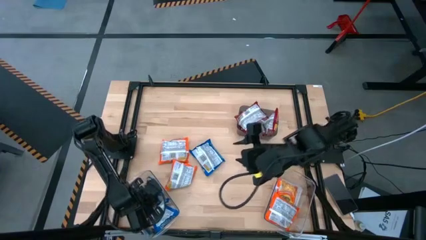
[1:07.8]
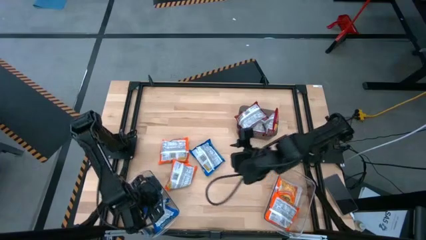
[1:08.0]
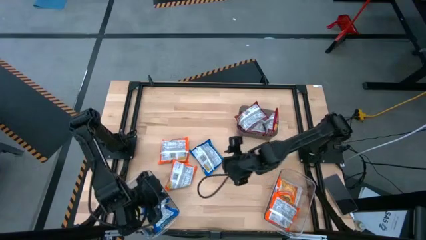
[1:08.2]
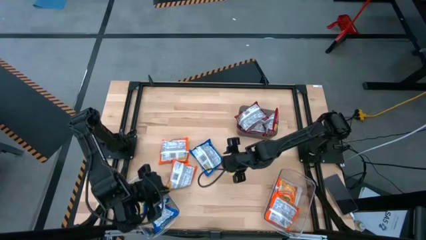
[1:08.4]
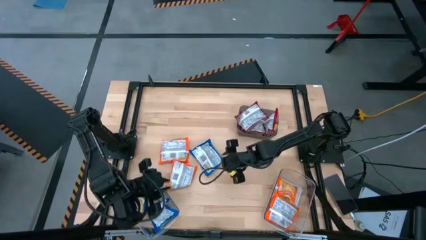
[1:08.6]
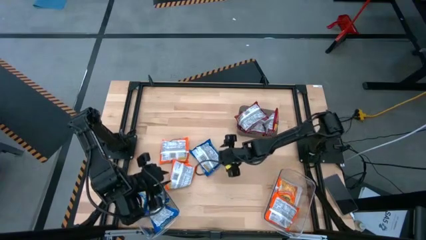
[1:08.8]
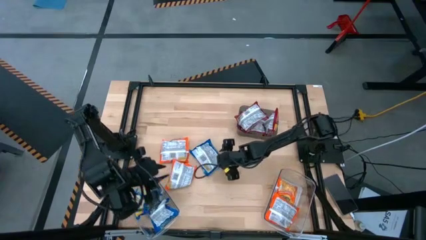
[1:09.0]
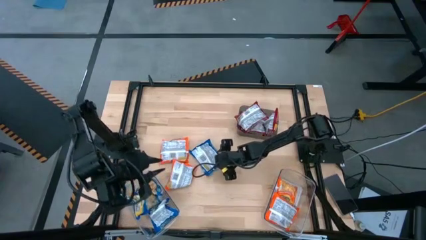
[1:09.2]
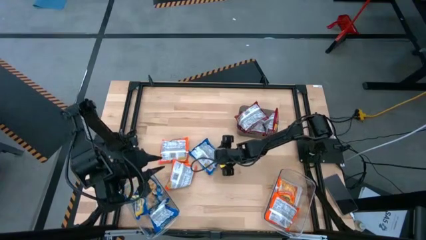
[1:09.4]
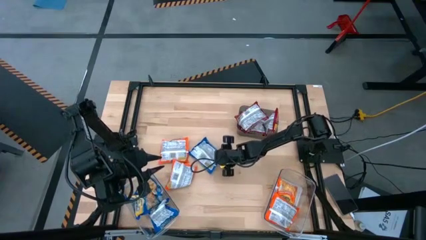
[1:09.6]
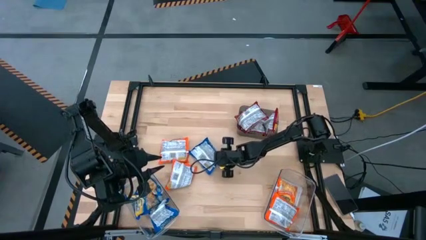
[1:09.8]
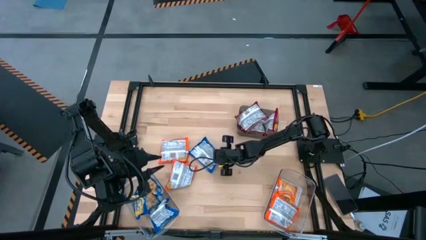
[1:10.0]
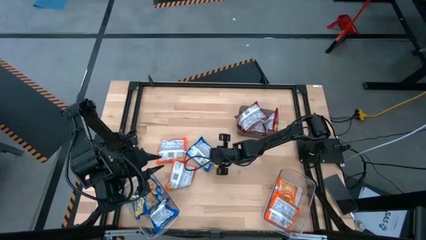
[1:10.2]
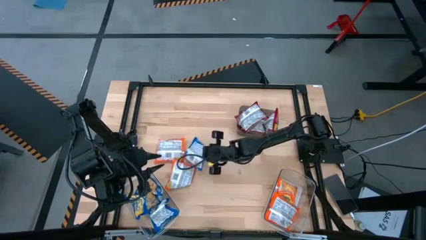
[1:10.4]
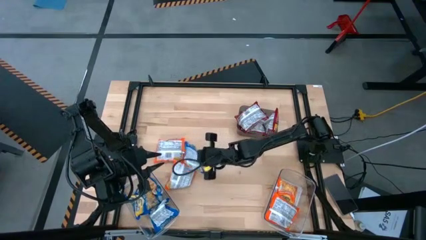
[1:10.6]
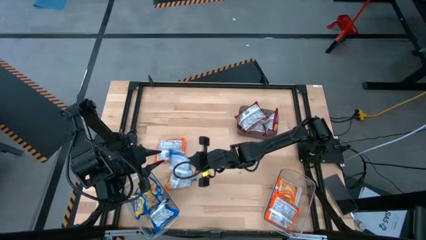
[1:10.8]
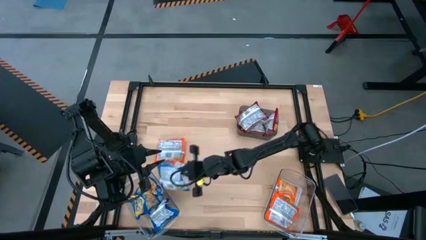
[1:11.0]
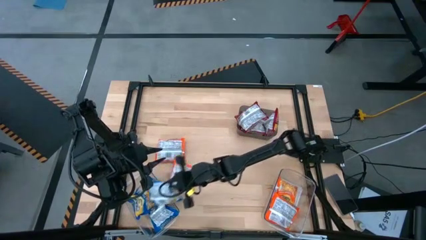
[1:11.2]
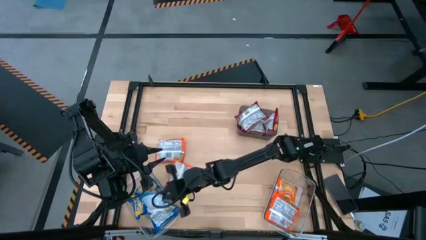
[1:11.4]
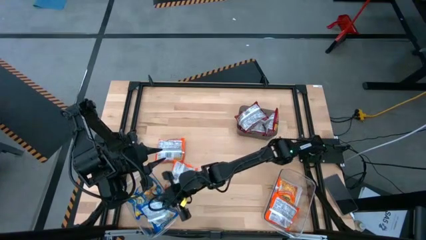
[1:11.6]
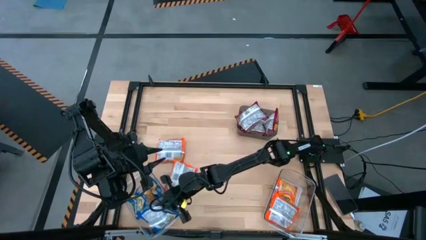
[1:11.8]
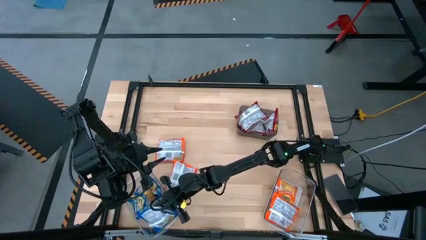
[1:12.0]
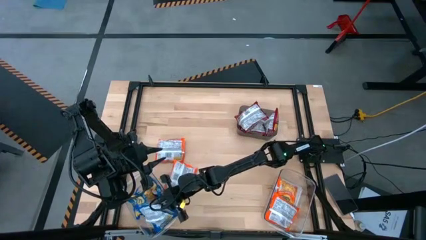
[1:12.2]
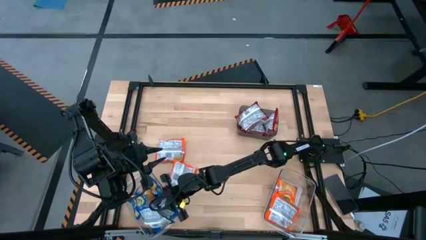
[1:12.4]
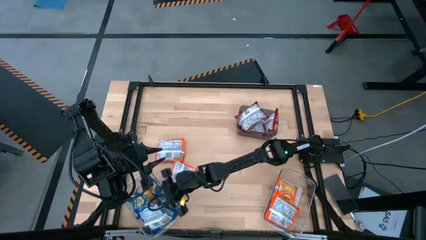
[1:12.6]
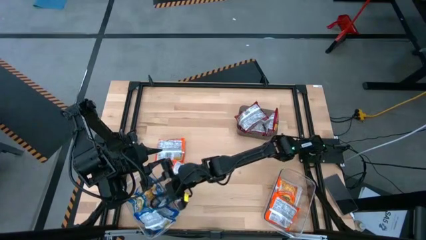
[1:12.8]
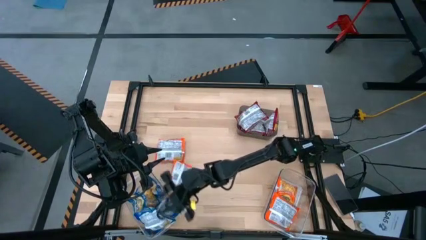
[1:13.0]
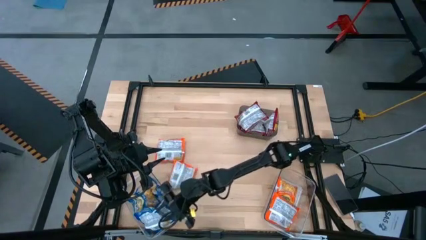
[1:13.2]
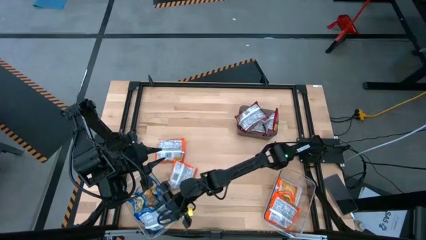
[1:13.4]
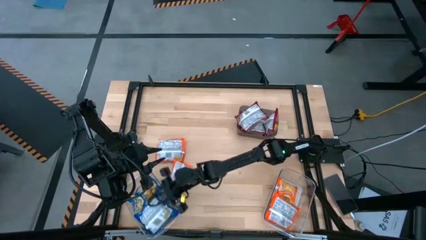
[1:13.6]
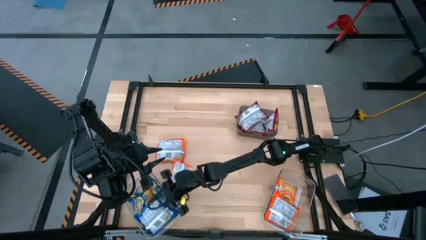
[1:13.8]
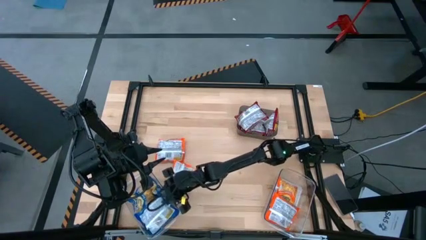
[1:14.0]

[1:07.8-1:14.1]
Task: Sort Maruchan noodles
Put the blue noodle pack into the left transparent bin

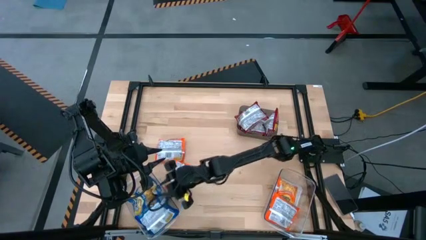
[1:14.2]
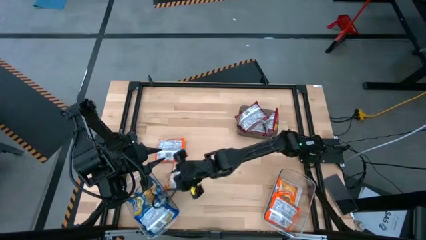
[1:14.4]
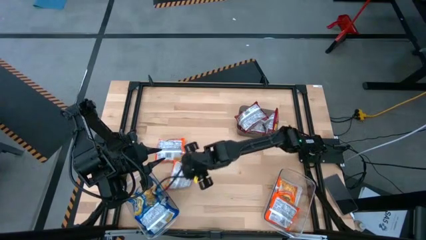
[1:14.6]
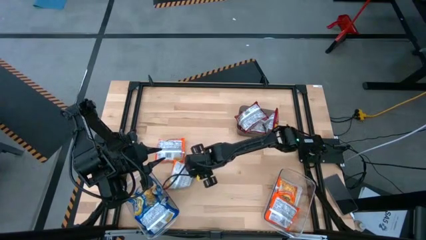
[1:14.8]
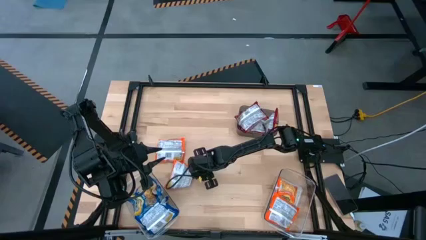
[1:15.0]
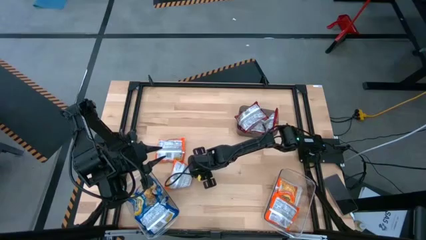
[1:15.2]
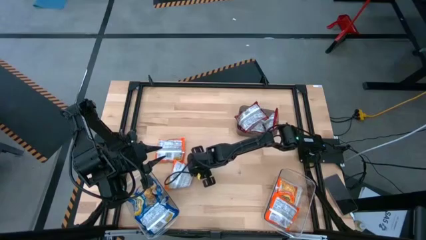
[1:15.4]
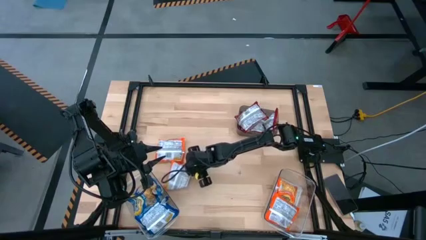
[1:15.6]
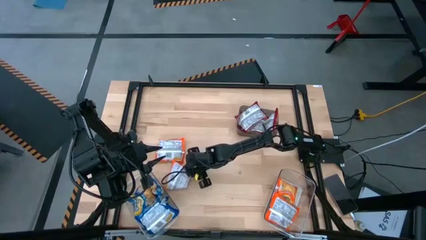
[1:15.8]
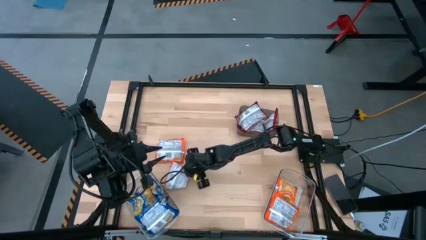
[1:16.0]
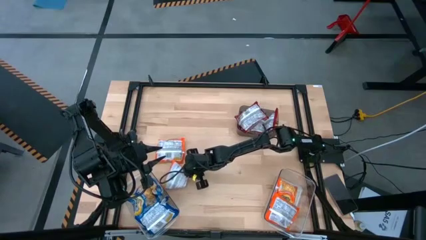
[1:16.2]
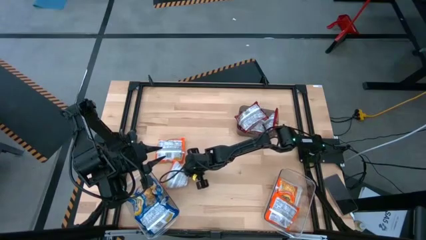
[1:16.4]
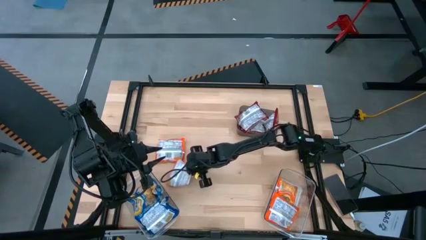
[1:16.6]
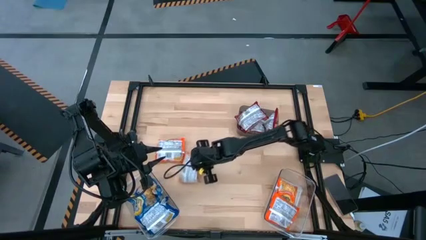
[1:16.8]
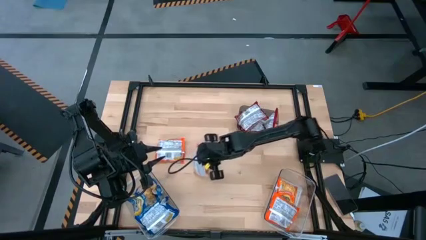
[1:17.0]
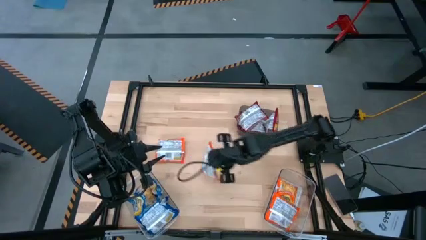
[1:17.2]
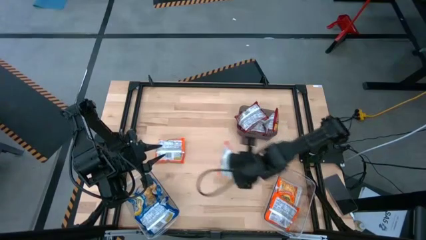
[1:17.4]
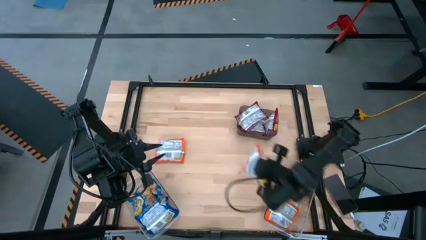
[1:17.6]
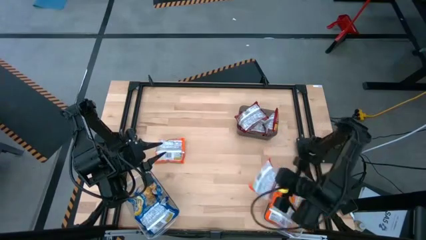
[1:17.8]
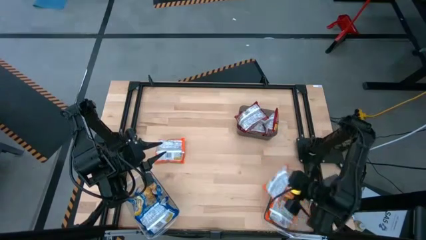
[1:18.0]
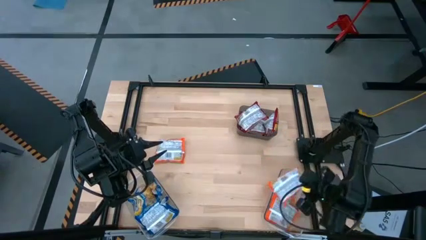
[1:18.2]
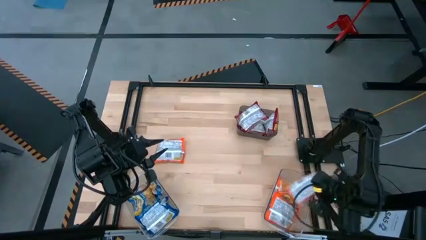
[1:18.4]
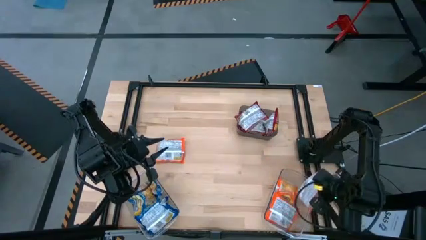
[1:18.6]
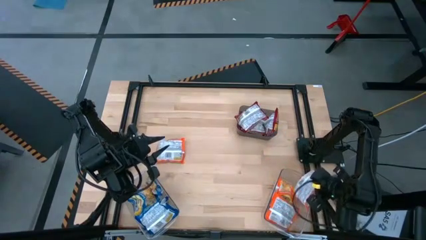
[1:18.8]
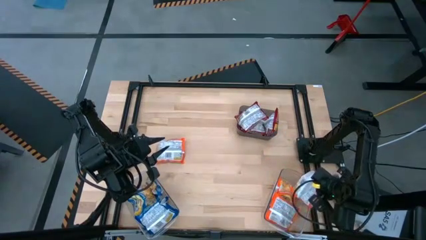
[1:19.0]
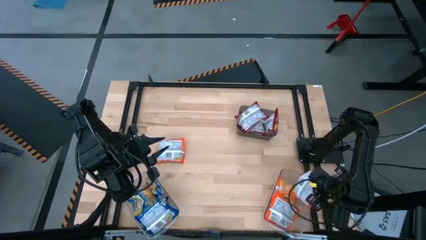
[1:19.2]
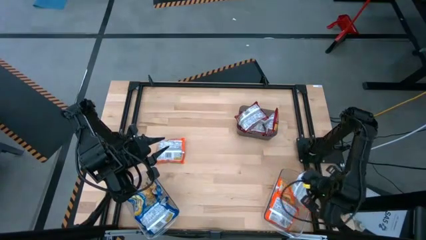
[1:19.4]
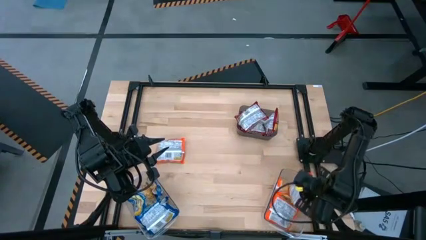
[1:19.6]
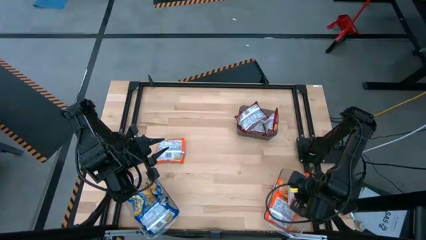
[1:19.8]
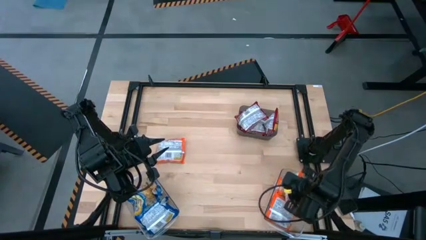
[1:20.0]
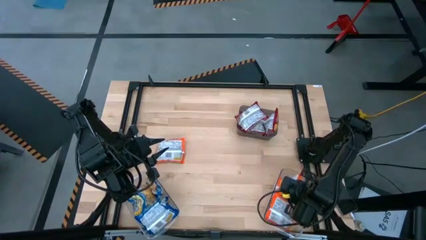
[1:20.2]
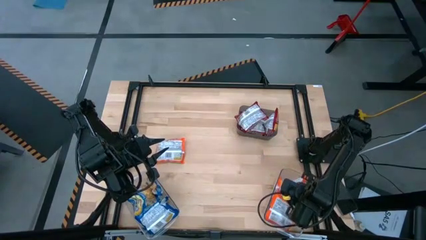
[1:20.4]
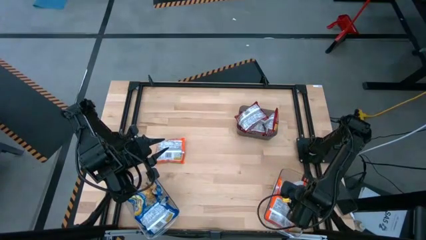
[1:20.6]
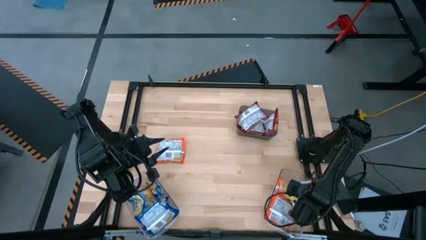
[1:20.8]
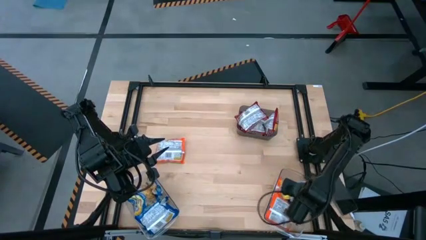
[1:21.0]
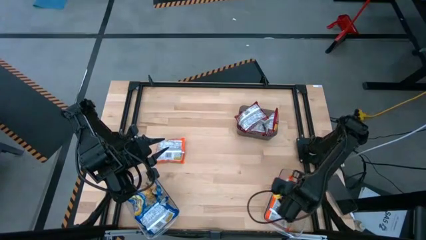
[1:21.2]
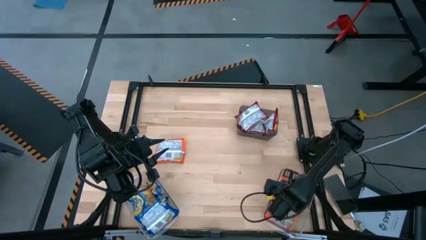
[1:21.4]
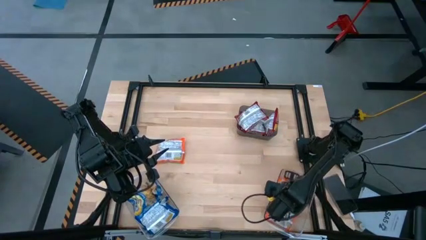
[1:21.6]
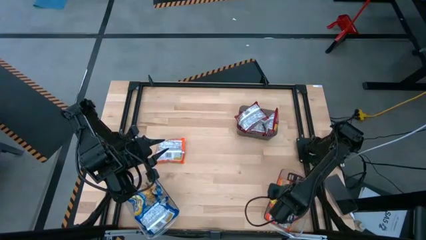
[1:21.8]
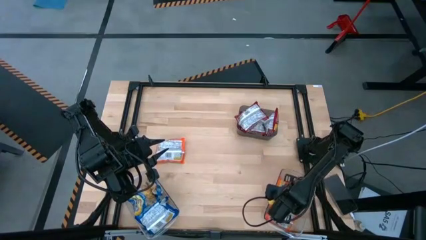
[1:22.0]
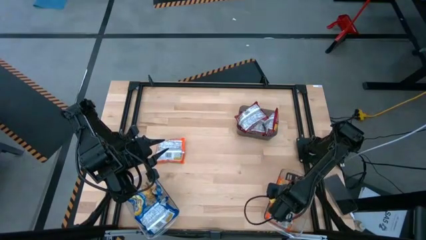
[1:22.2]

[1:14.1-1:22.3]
Put the orange noodle pack into the right transparent bin

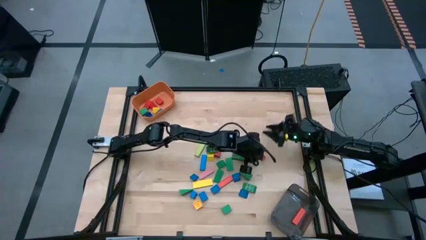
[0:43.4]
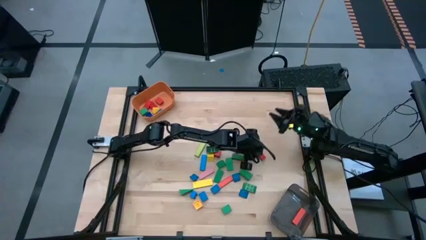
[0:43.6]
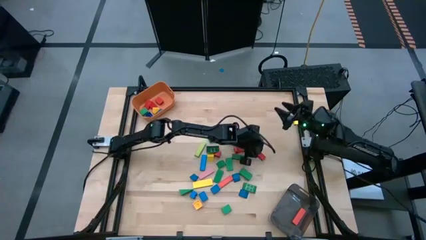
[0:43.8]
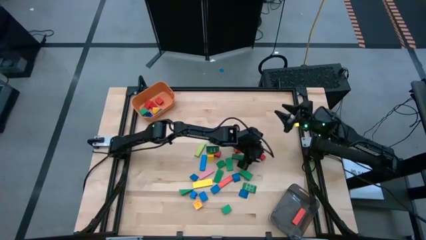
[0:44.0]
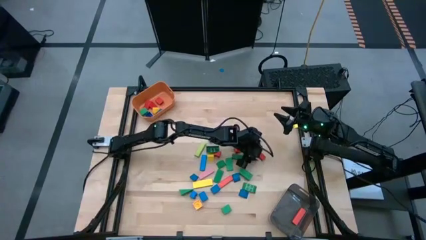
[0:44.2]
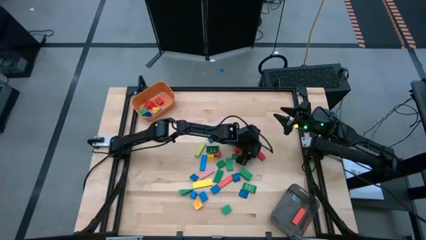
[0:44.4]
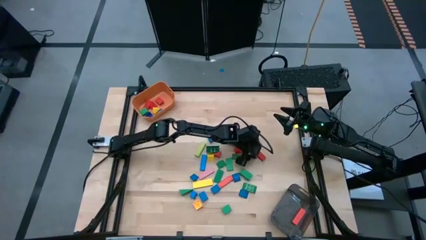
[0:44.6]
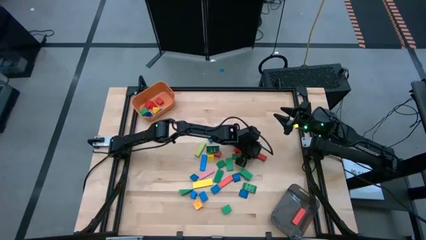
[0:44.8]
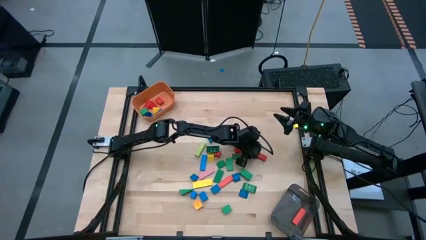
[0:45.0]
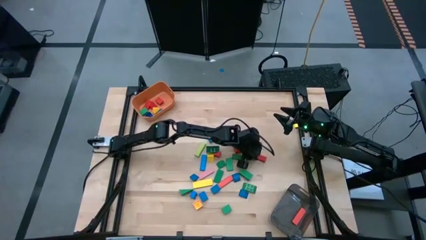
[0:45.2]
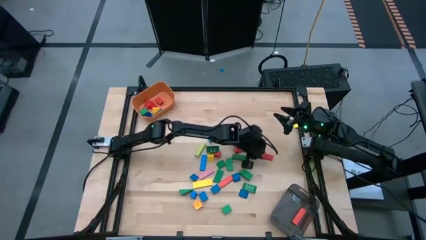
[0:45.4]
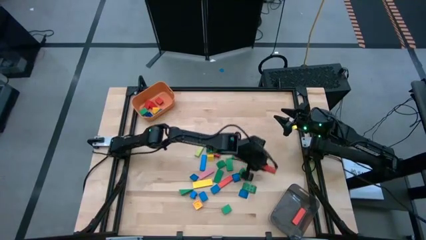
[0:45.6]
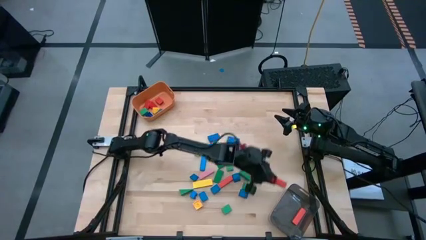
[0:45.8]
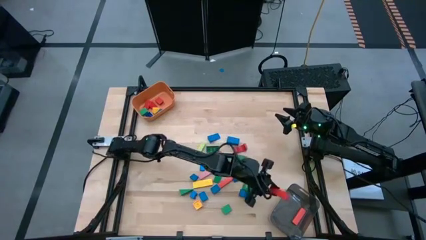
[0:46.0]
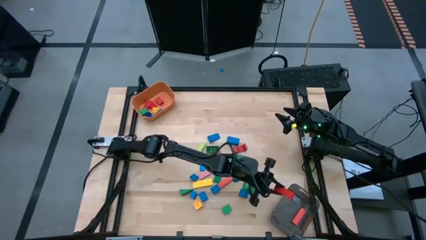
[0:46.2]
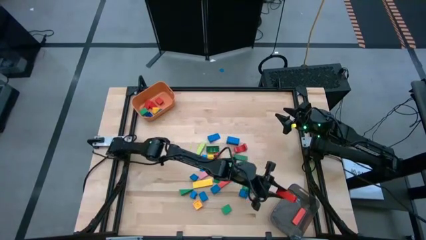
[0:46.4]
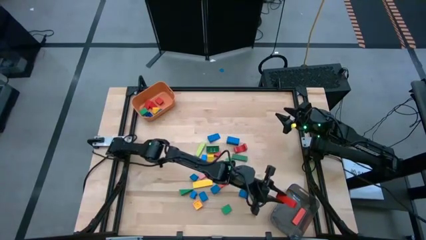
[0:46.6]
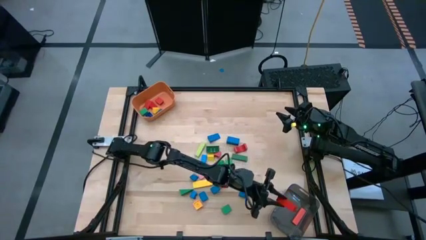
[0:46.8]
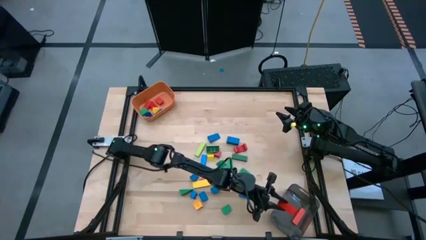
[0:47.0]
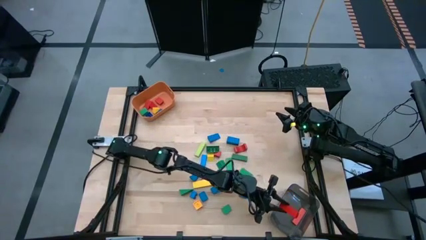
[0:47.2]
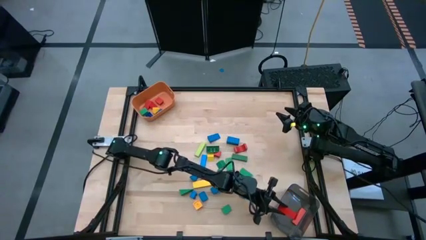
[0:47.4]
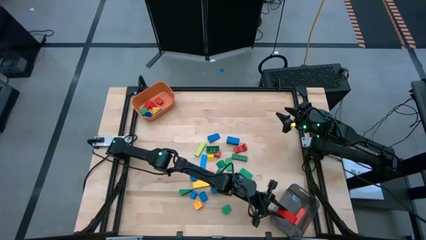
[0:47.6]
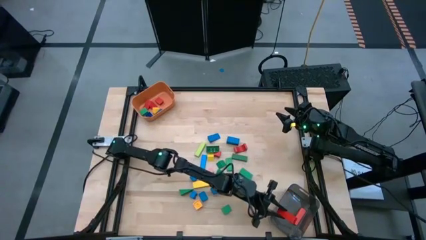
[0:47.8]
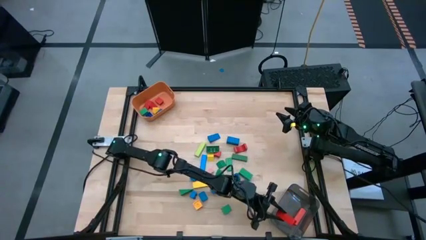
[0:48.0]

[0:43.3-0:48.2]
Task: Sort blocks by size
Put the big orange block into the black bin
